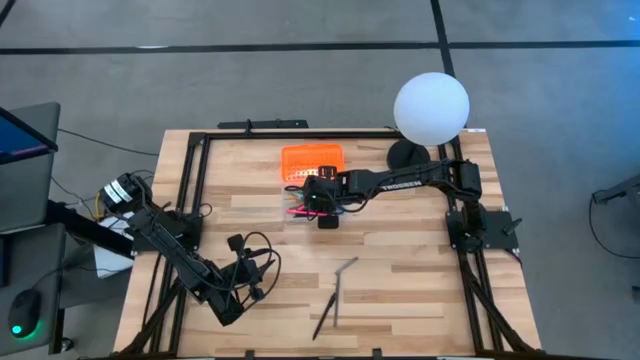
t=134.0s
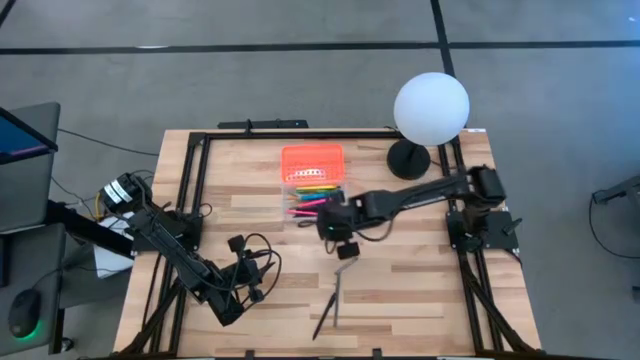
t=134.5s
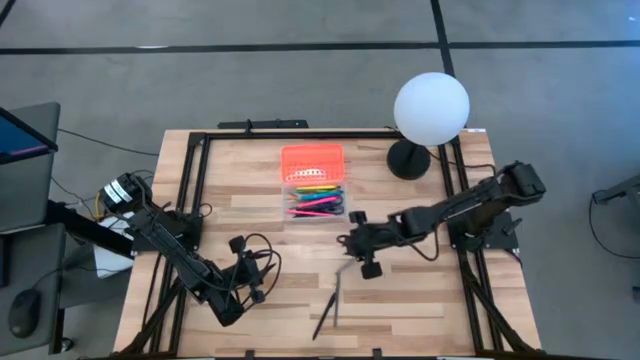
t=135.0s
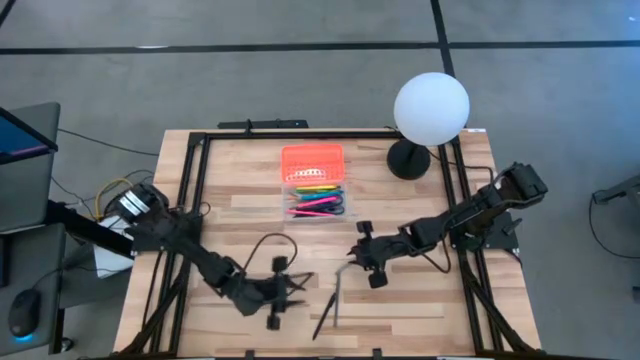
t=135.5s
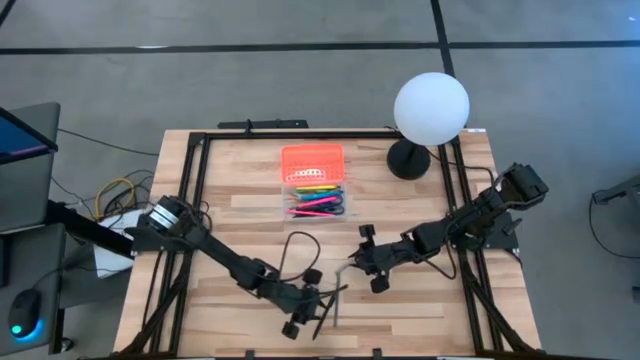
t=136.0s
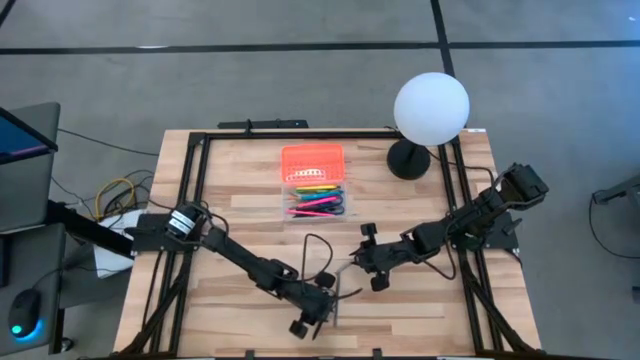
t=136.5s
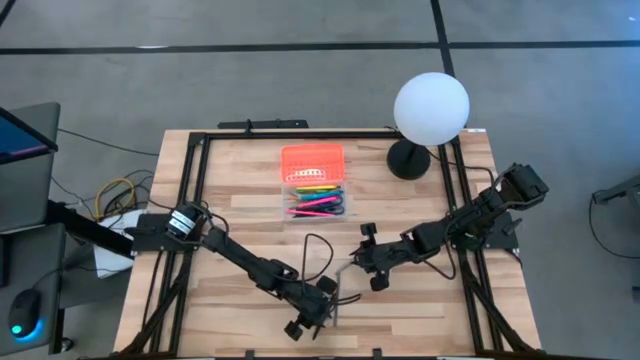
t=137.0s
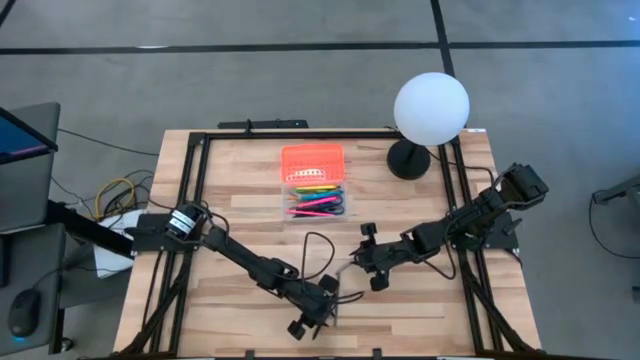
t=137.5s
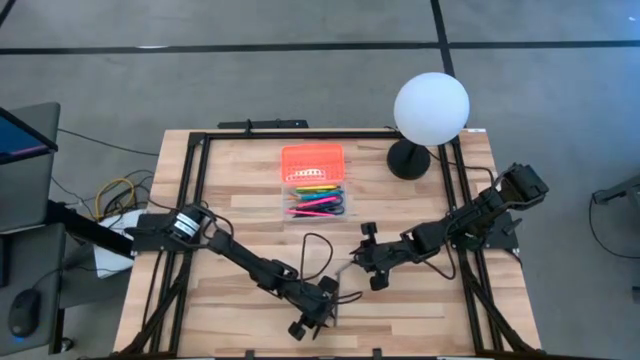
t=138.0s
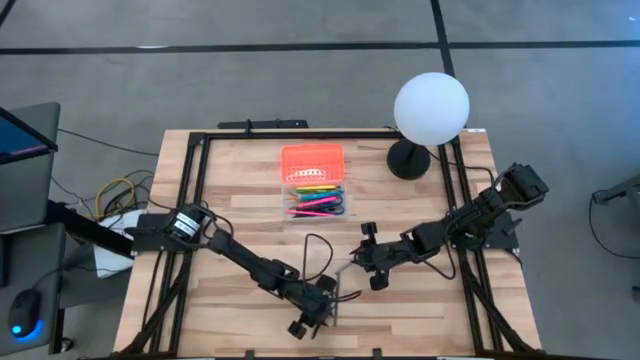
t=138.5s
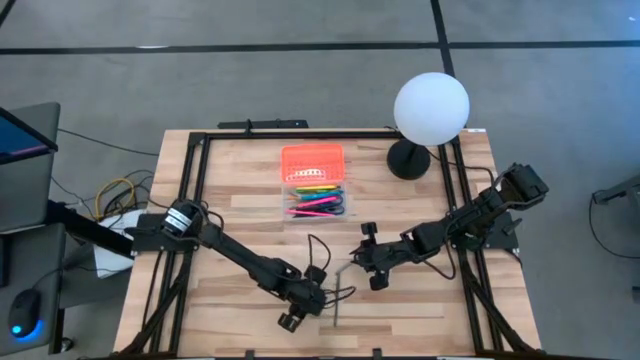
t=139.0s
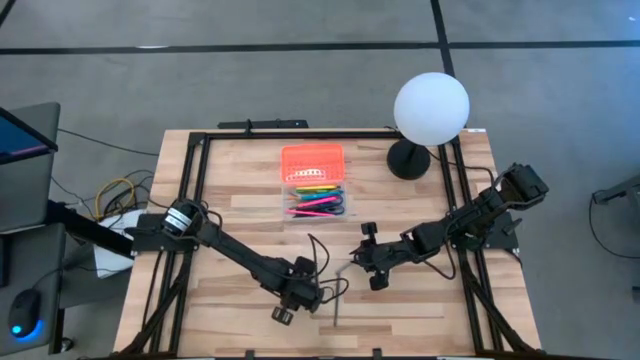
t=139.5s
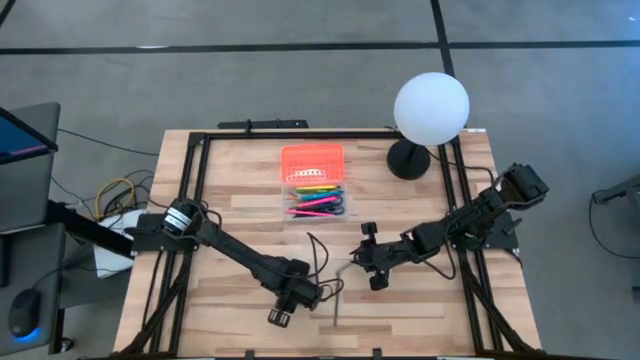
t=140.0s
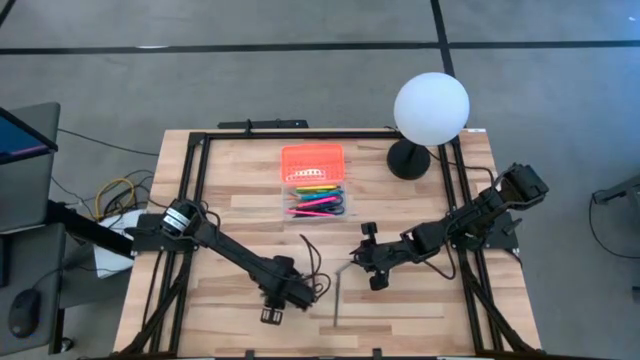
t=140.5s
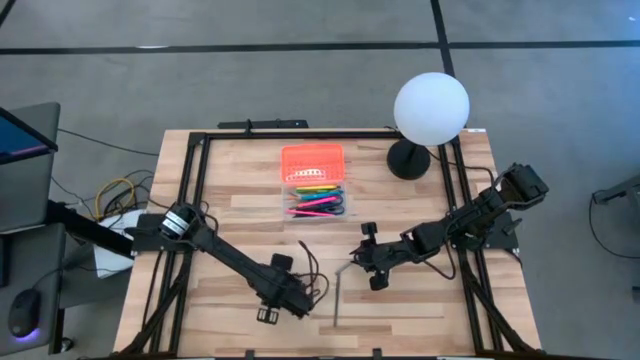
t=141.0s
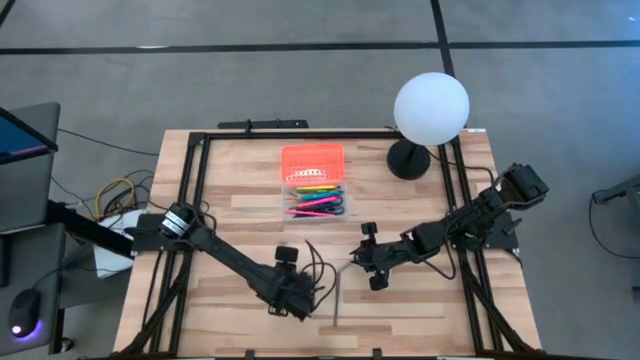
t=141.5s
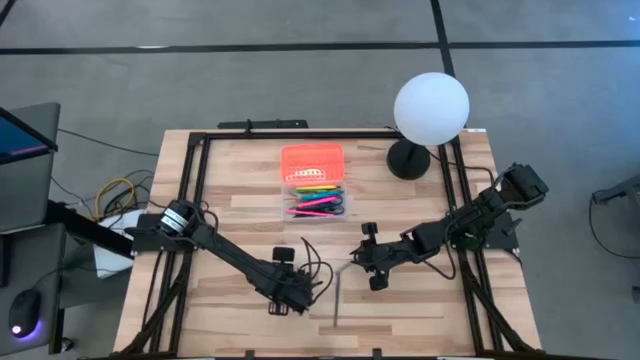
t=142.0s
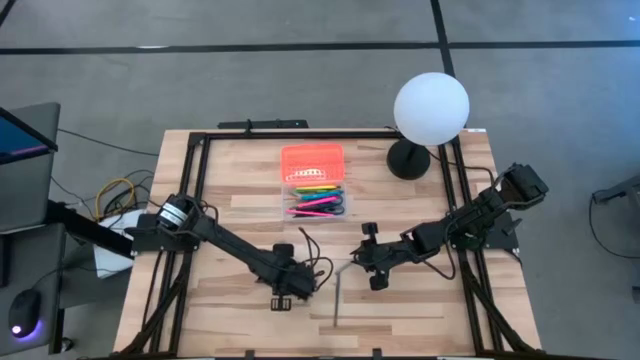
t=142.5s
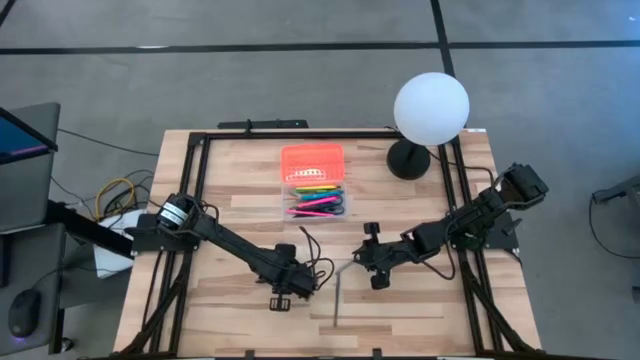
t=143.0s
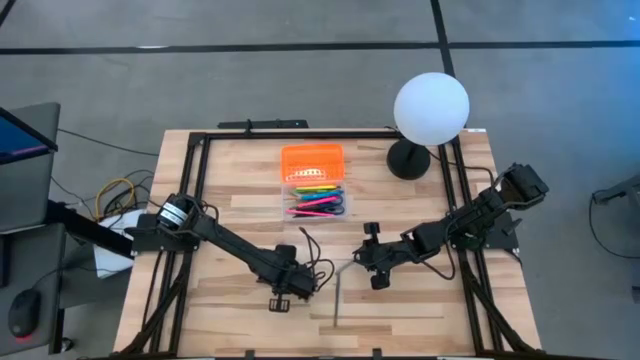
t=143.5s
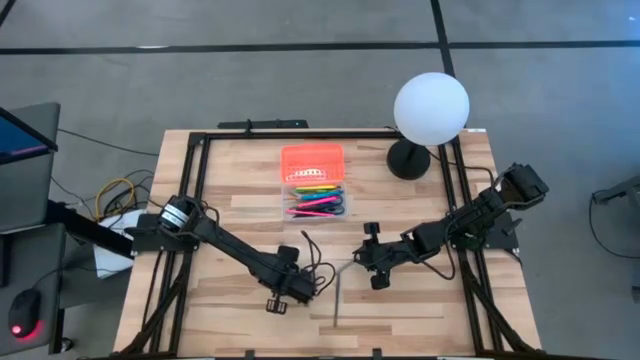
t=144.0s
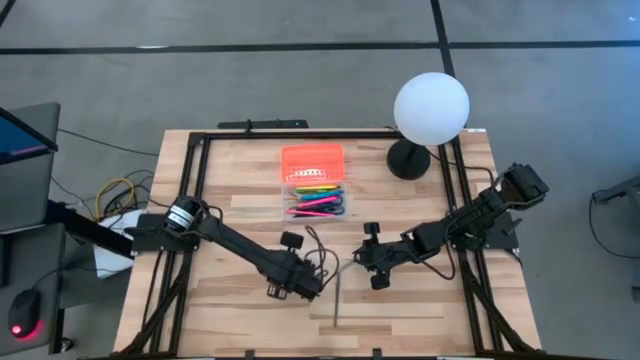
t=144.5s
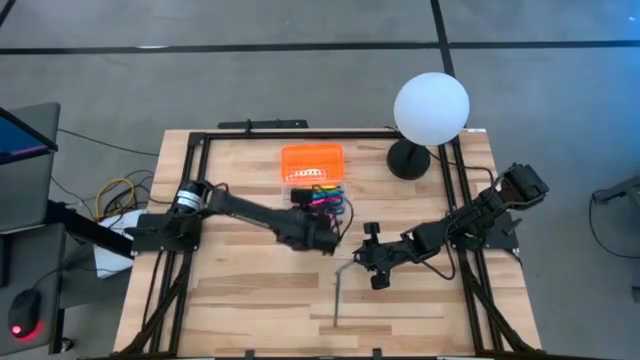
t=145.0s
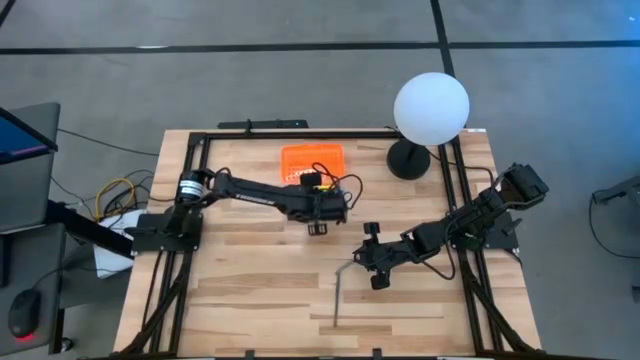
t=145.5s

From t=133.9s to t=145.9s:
Task: Pick & place school supplies into a supply box
Put the black pen into the supply box

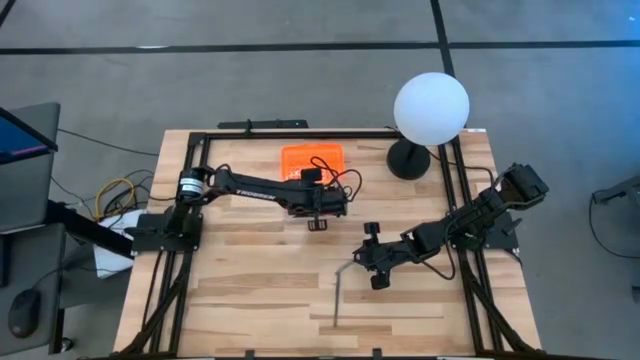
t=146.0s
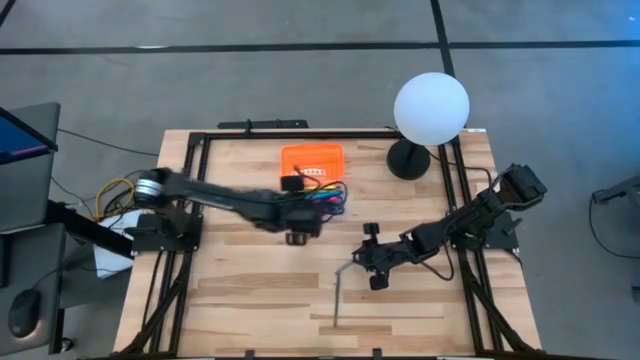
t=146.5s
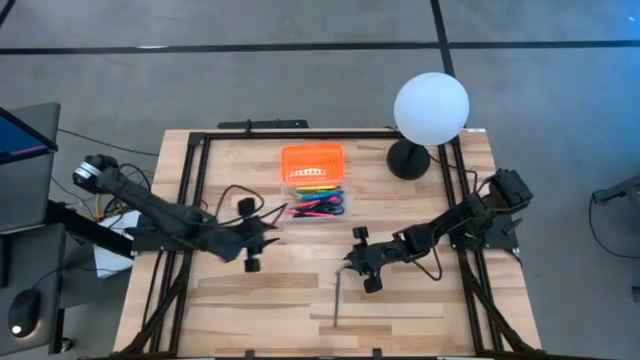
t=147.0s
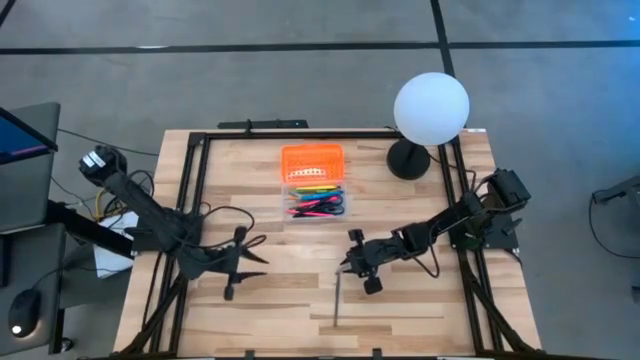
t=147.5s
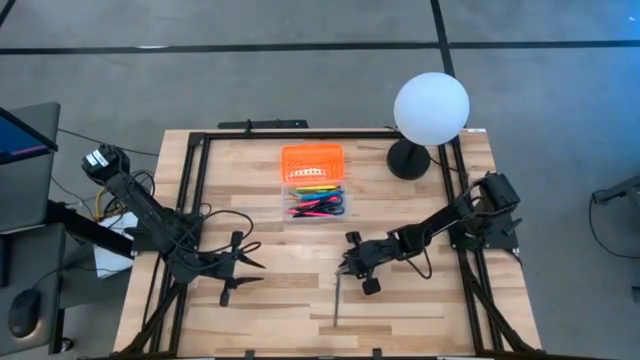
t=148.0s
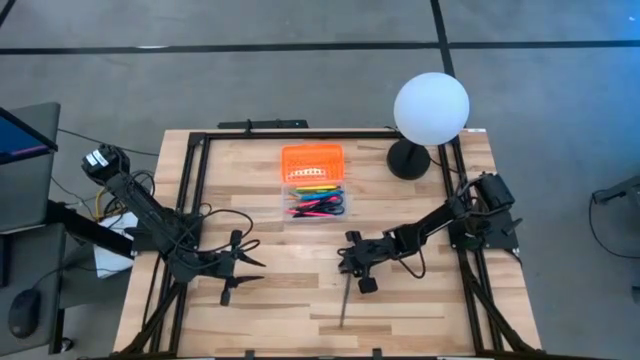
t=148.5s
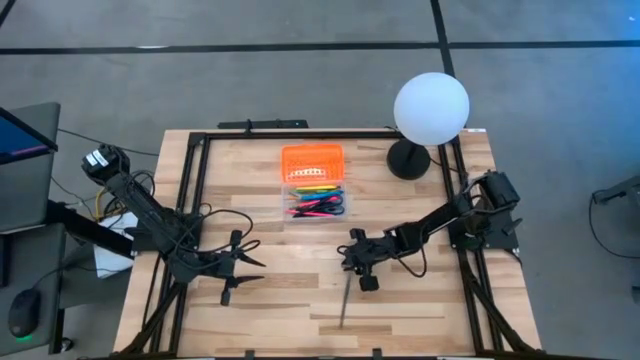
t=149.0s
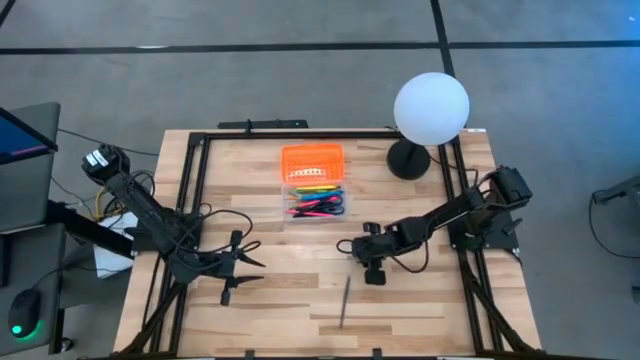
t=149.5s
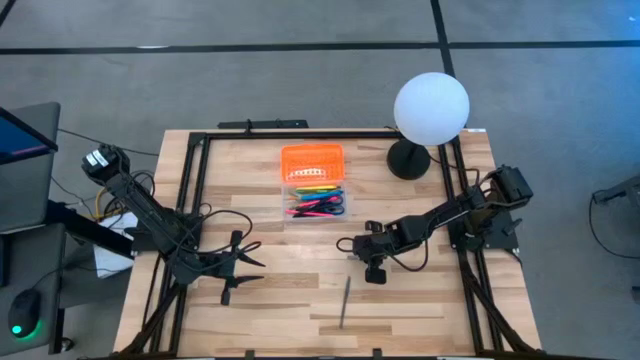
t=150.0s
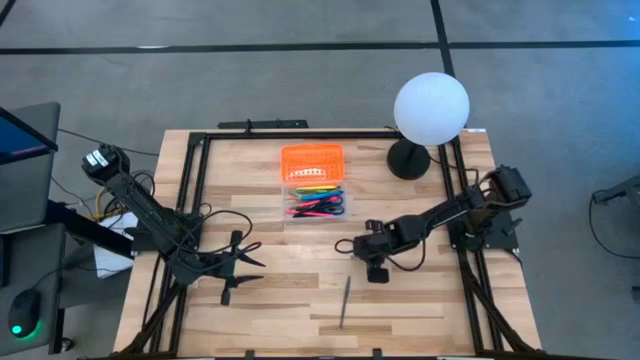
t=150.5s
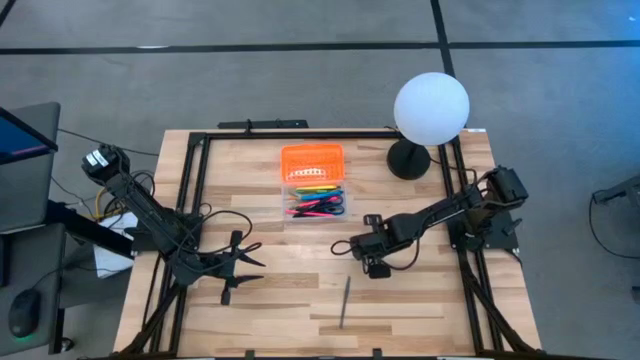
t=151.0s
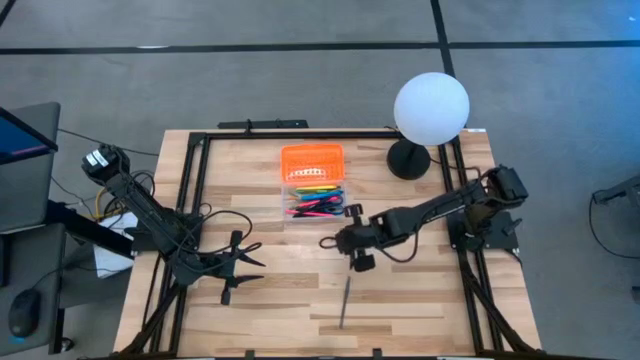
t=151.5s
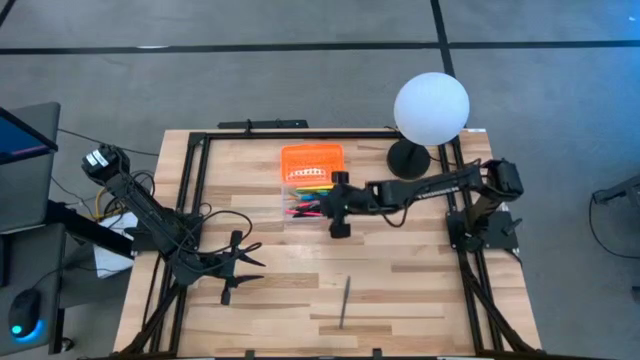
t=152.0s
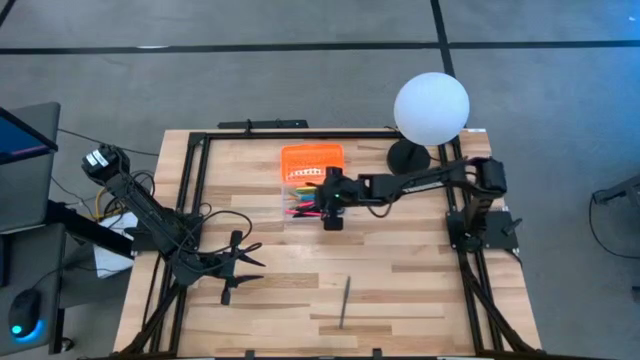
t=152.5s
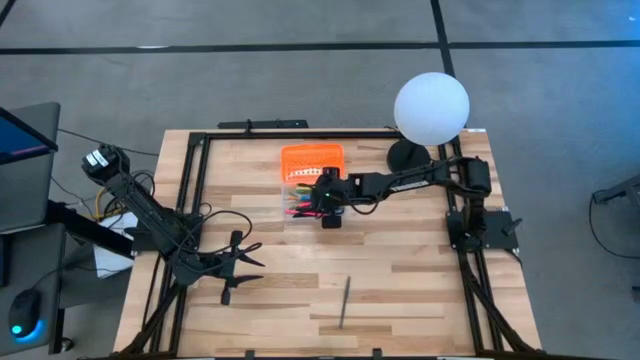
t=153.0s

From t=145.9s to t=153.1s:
Put the gray crayon into the supply box

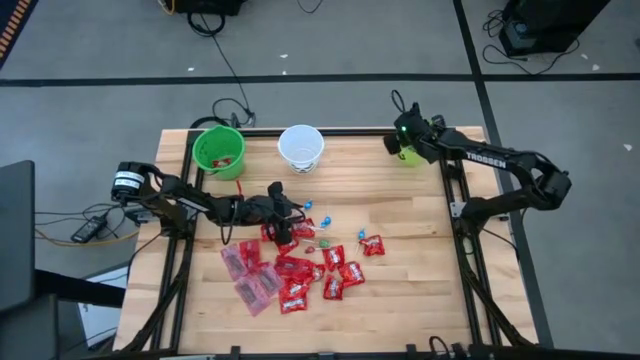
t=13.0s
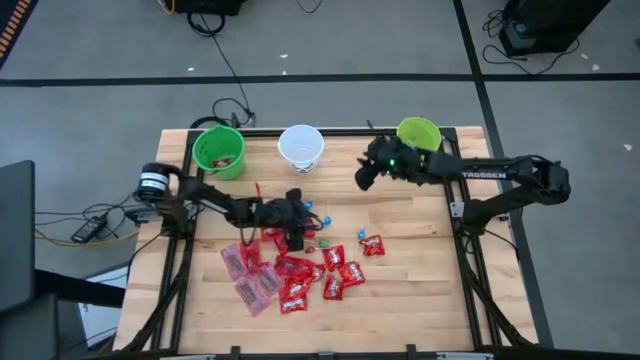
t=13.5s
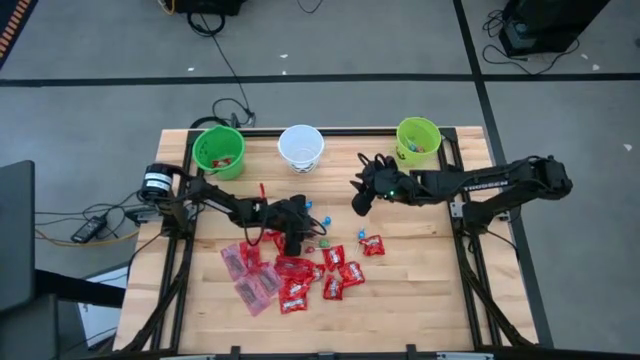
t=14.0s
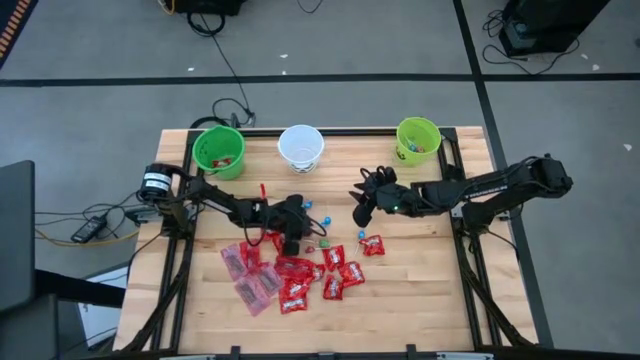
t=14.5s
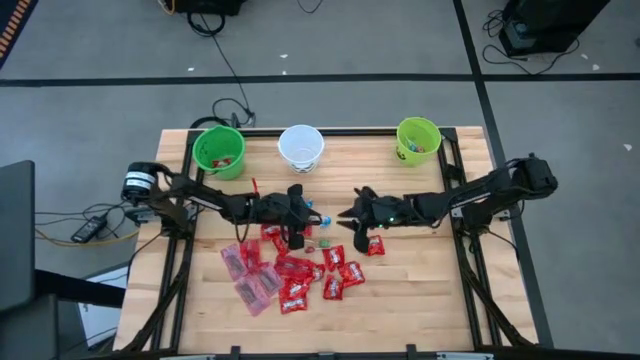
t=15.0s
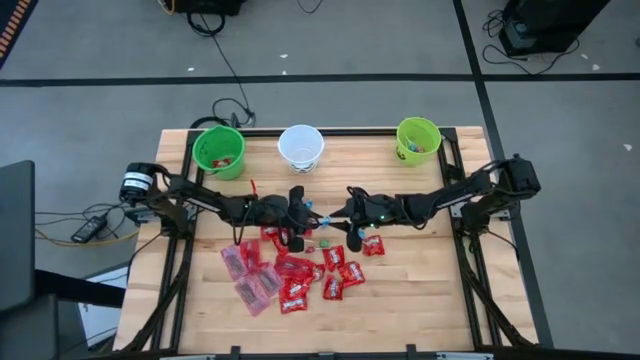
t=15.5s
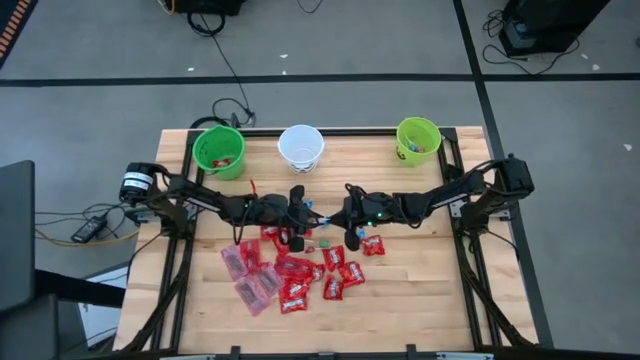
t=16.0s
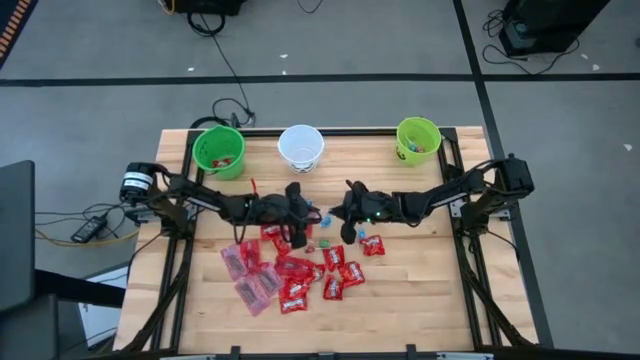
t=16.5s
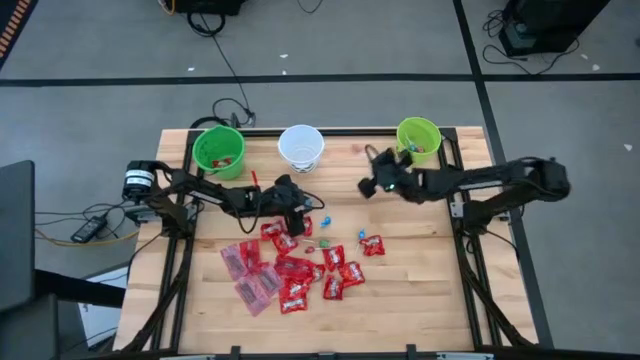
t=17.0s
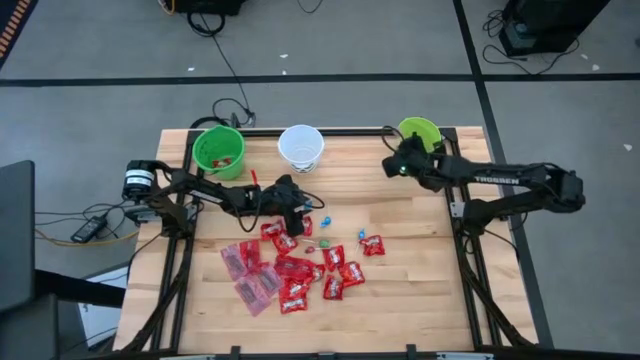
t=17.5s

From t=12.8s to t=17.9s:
Task: Sort candy by brand, put in halloween buckets
Put the red lollipop into the light green bucket
